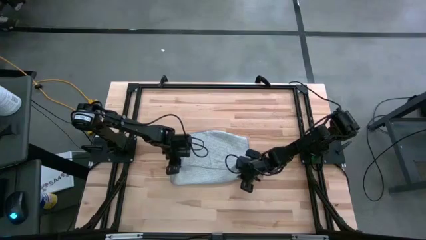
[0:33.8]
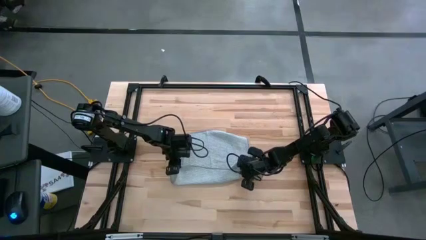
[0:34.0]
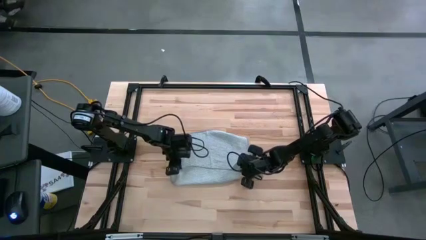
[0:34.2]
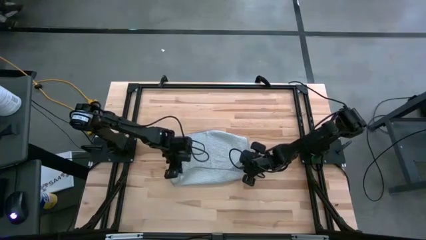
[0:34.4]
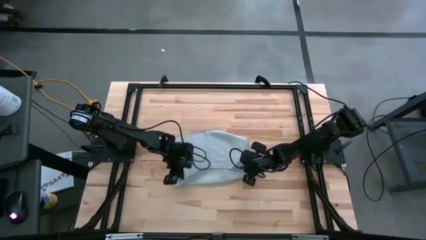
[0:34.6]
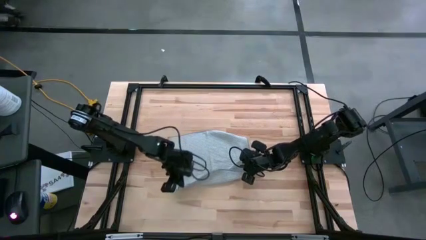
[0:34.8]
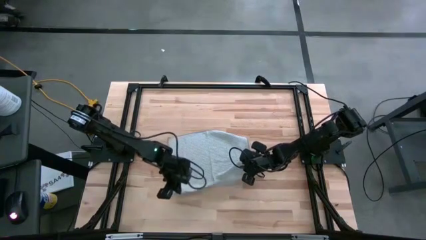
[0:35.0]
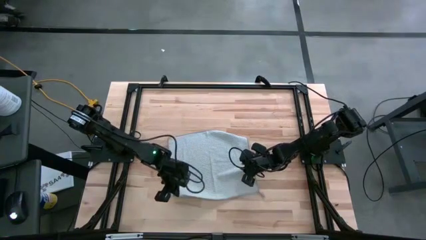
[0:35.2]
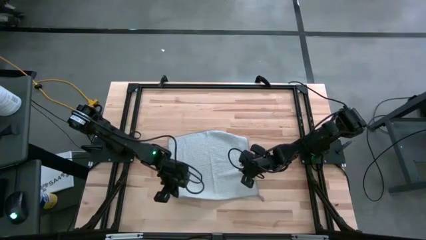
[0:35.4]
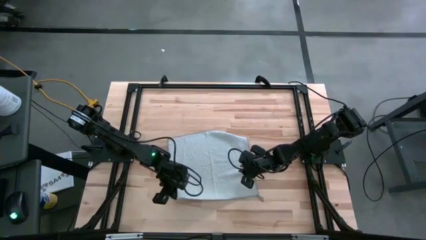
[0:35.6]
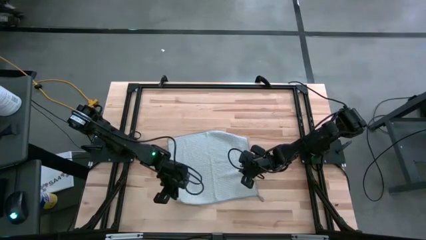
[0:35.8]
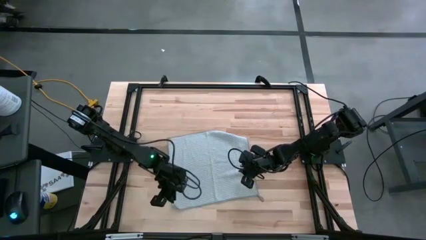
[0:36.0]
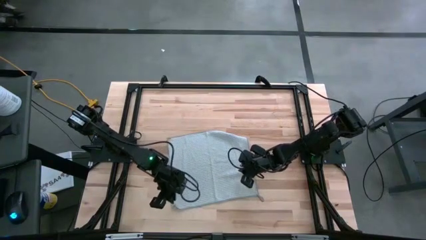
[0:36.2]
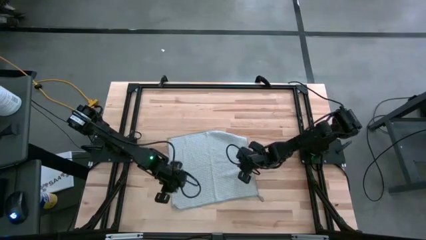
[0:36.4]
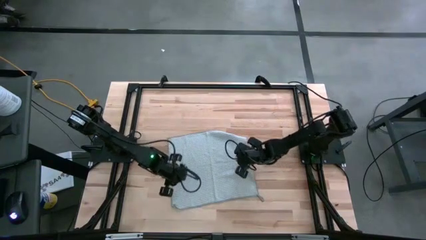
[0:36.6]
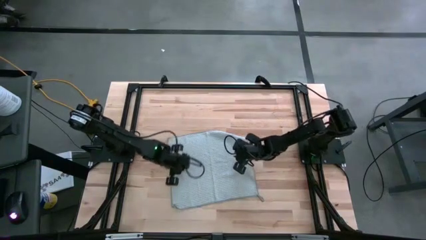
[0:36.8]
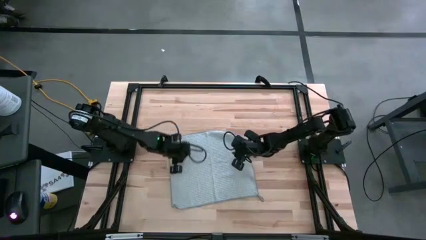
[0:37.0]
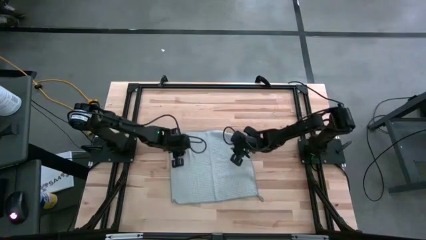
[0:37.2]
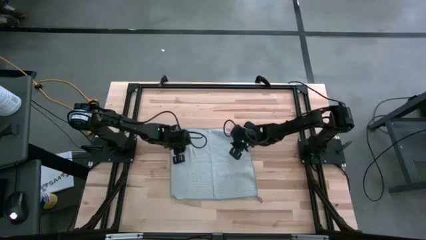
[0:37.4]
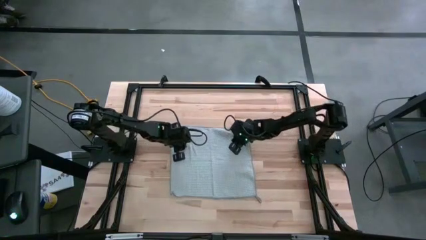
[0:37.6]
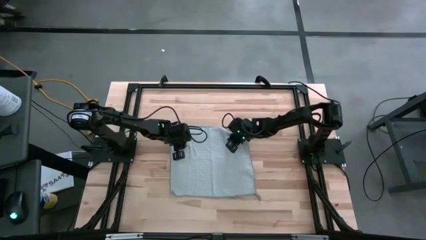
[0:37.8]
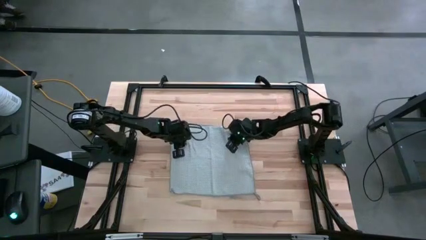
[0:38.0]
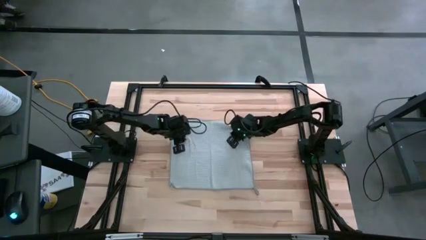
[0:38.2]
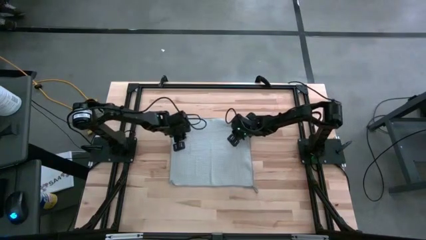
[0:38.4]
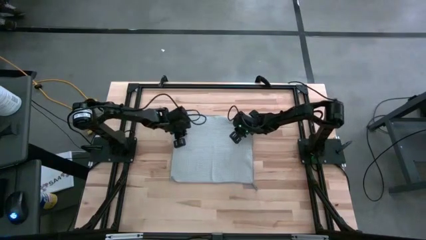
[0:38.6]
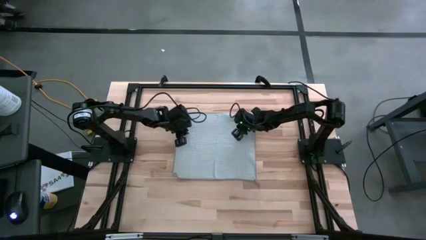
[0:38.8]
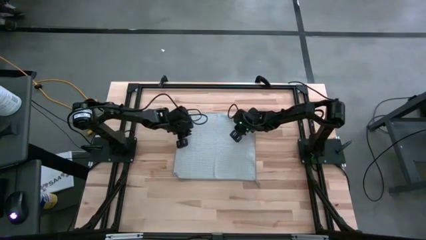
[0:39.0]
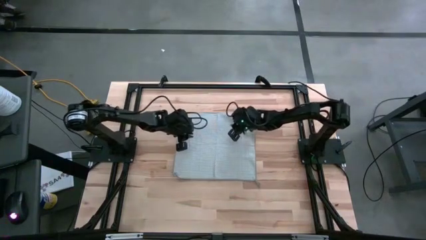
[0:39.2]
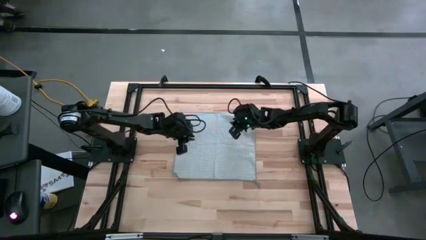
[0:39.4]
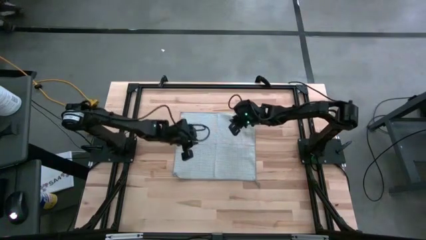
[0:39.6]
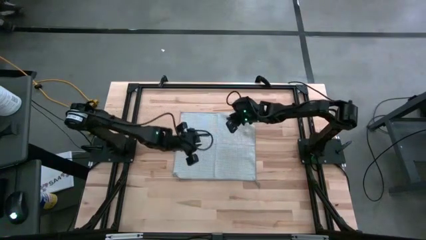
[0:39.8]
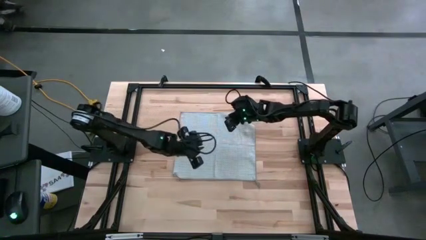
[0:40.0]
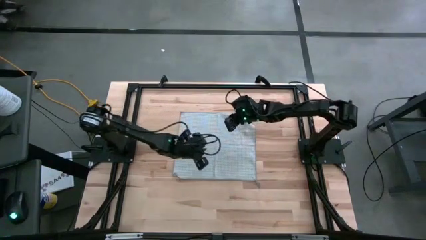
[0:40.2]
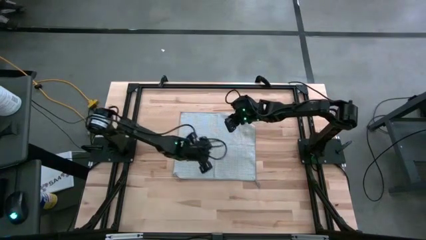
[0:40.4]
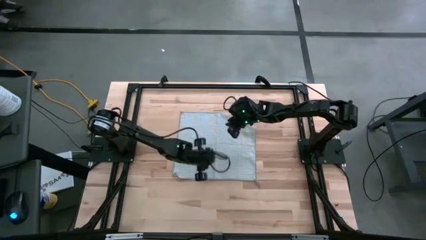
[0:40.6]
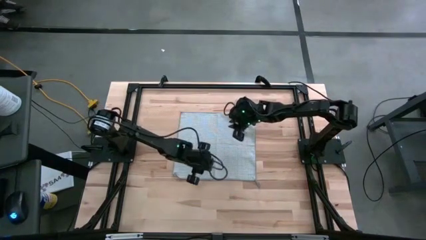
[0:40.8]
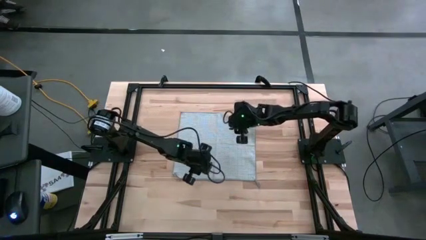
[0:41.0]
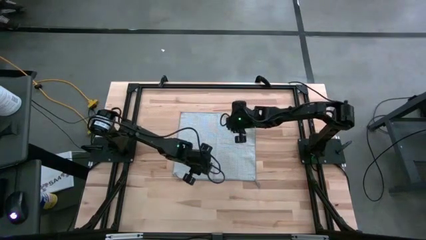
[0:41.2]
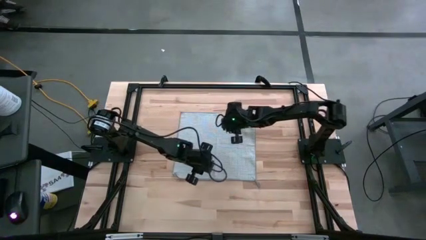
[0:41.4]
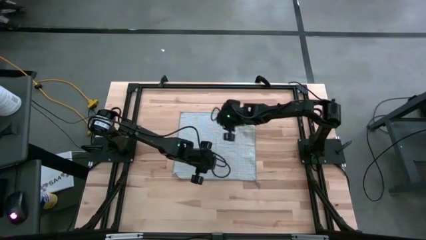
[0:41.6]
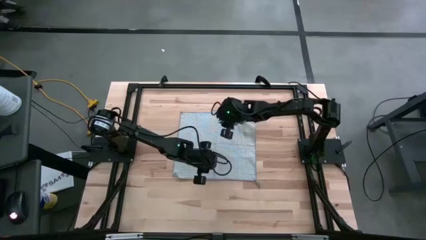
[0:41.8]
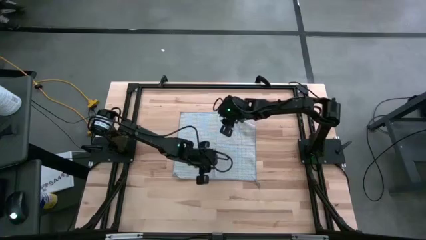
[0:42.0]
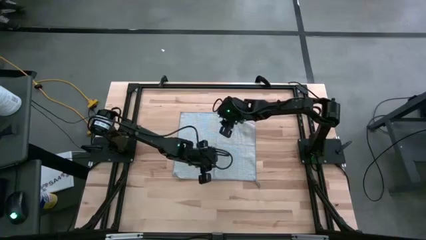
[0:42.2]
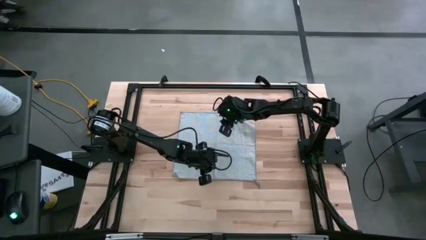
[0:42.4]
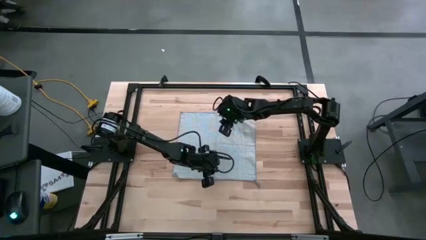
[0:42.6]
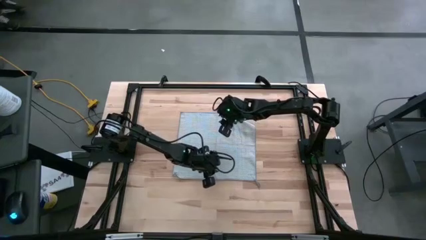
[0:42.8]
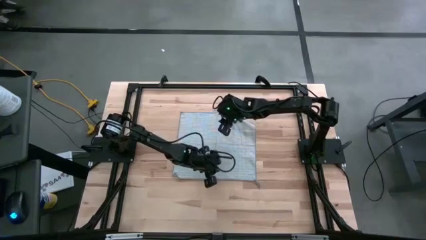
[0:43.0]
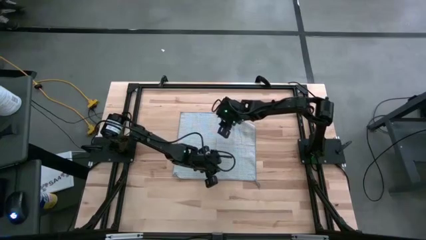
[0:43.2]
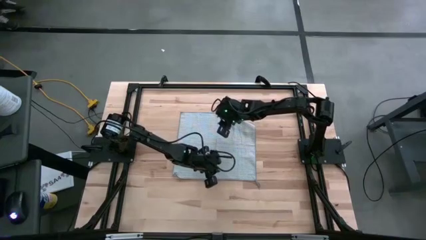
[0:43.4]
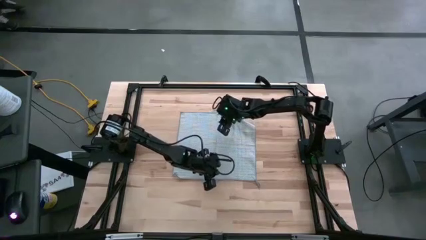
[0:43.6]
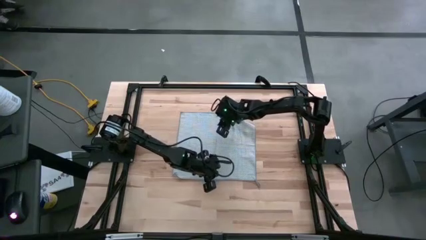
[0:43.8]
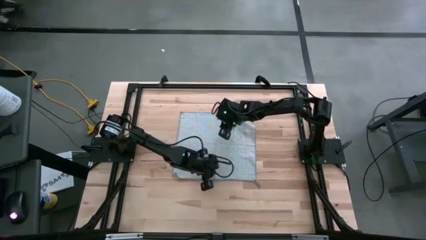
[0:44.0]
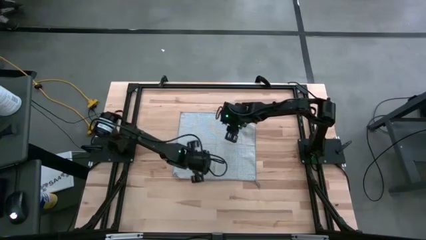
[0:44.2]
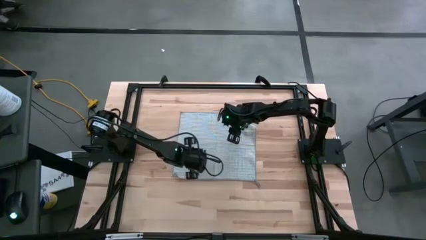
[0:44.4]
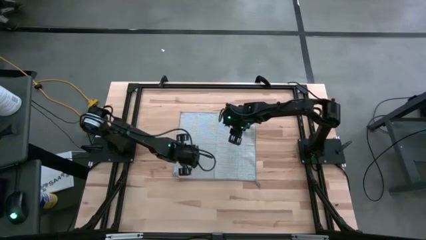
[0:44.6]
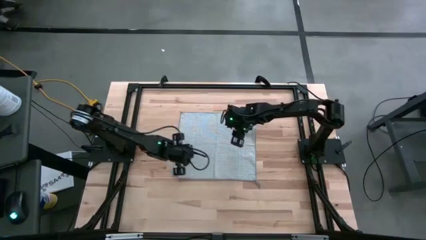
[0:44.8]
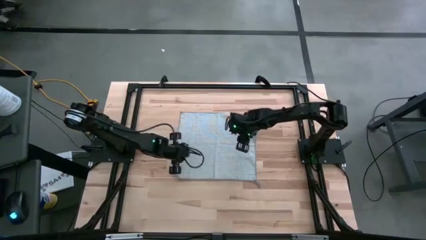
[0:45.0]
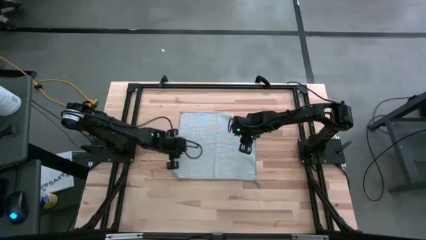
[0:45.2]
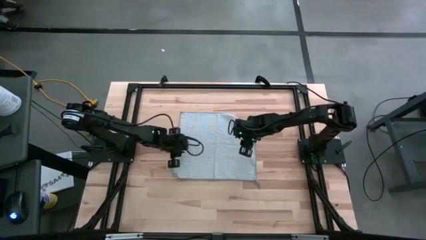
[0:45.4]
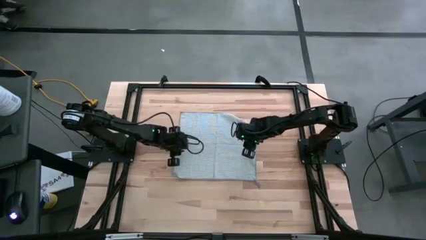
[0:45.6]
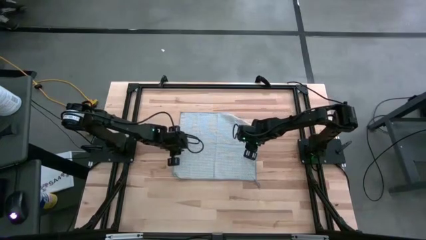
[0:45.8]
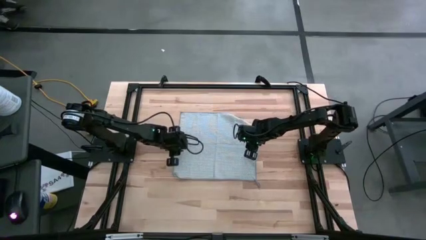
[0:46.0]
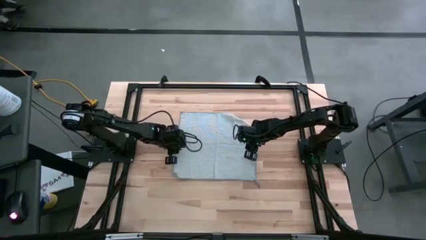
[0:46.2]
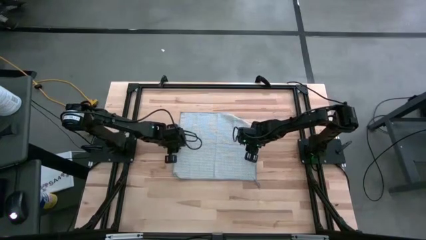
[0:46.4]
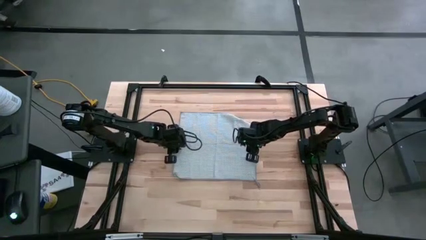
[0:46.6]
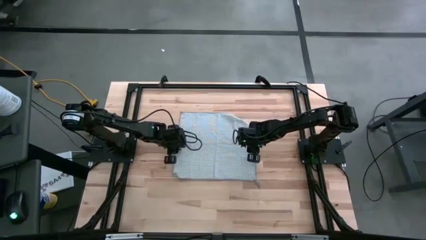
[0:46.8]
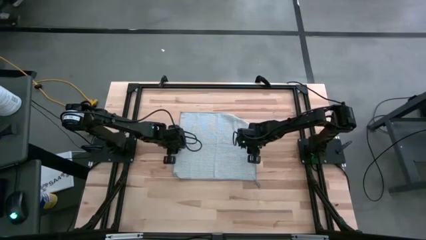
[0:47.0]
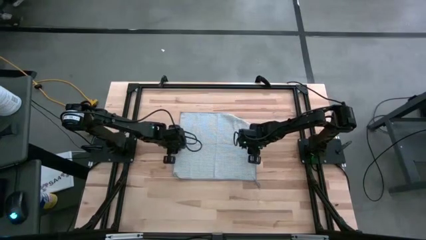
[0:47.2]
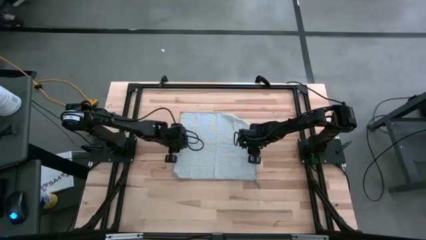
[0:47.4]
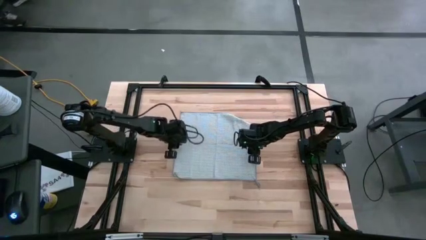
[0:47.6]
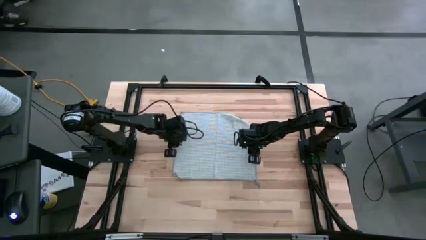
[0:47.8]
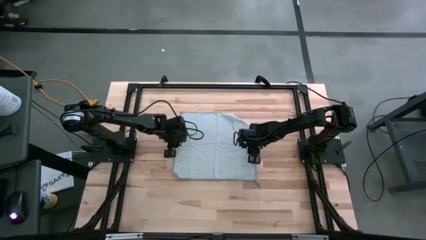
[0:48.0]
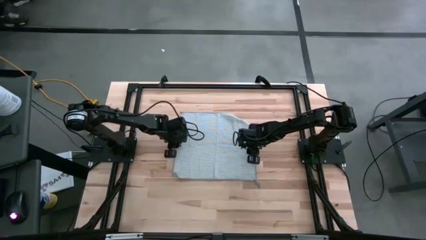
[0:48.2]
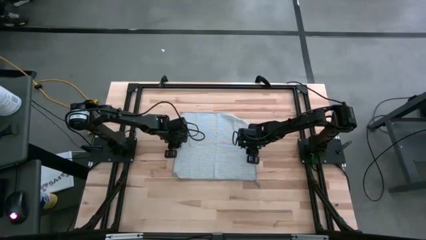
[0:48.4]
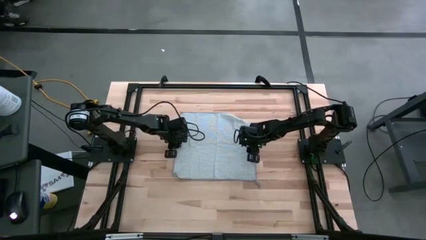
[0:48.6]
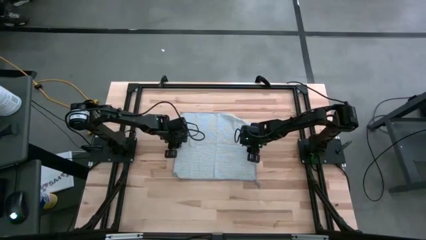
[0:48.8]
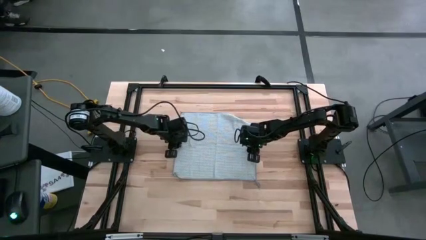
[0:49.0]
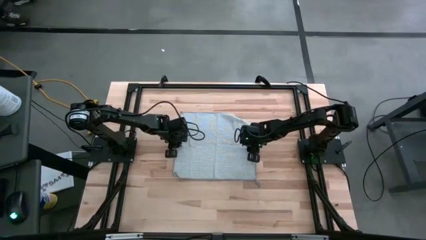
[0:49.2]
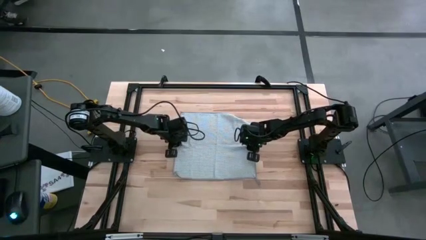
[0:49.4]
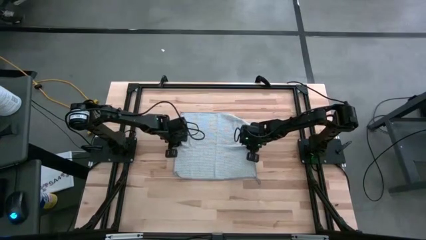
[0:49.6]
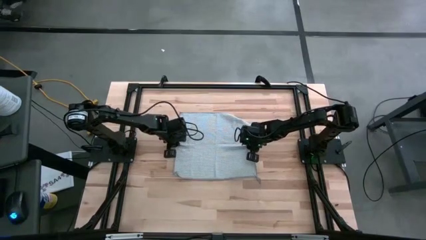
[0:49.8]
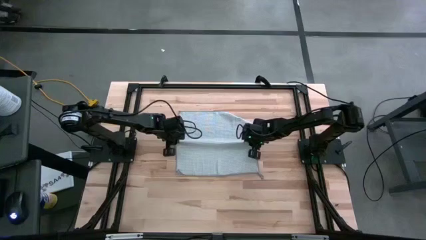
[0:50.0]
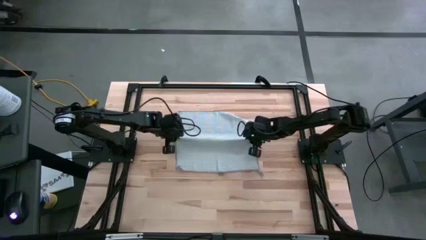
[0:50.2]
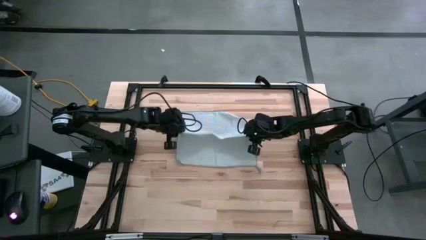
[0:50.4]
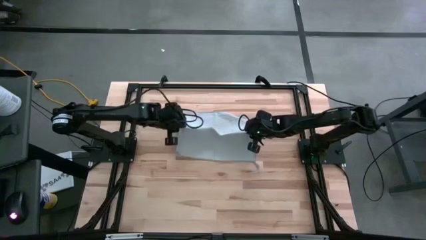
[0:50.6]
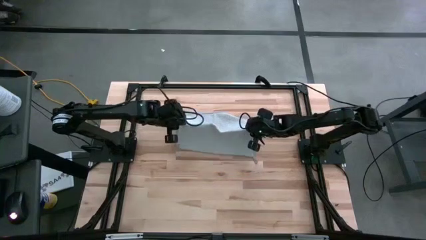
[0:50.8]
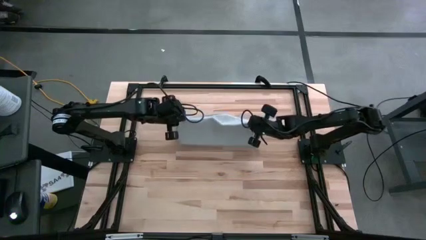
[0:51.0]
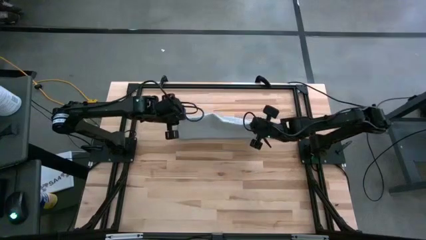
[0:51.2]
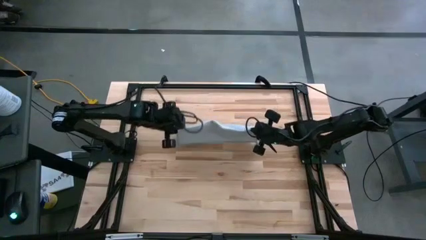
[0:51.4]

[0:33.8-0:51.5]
Task: Fold microfiber towels
Fold the gray microfiber towel
